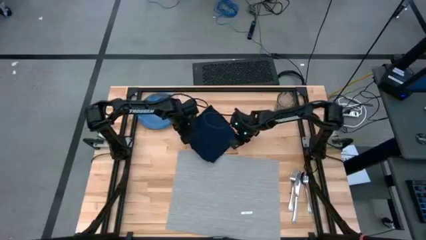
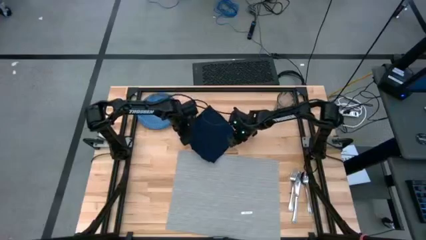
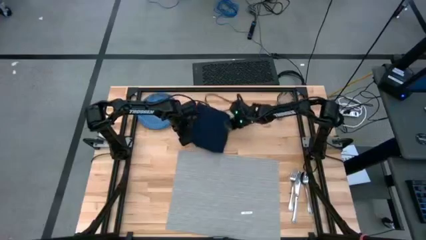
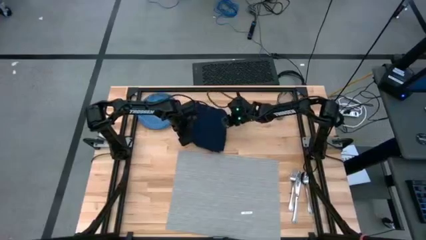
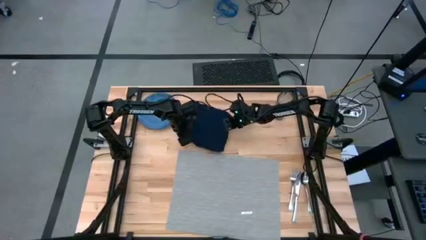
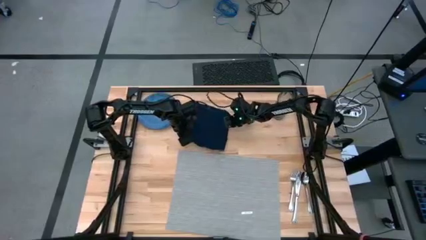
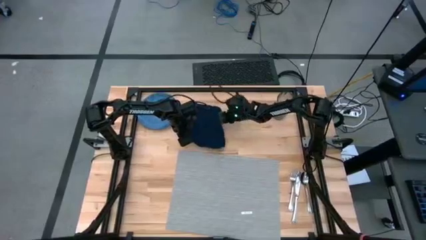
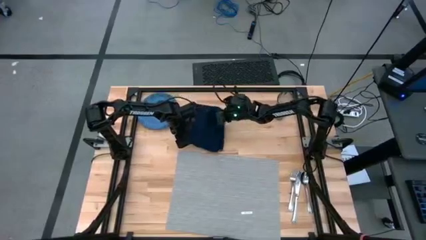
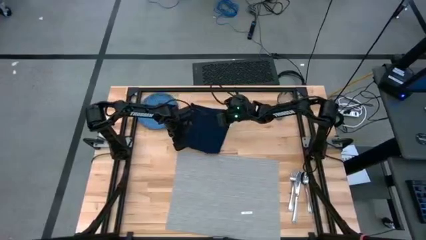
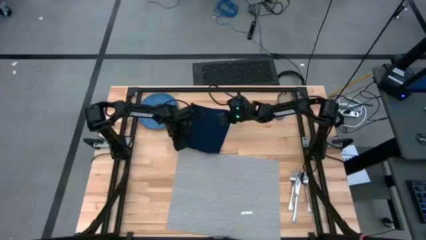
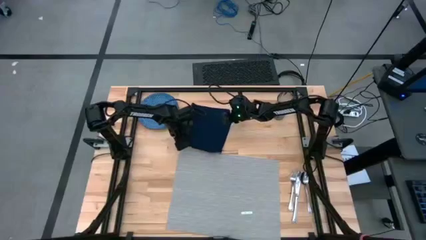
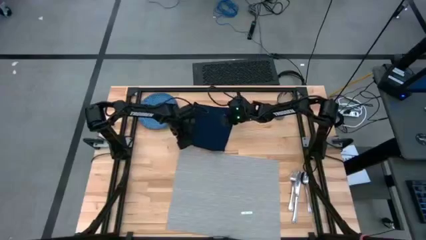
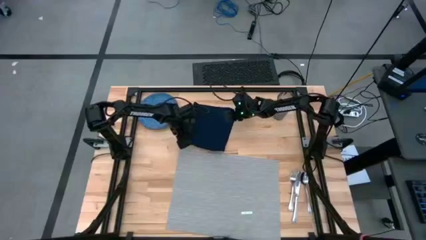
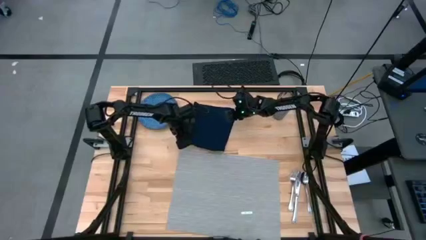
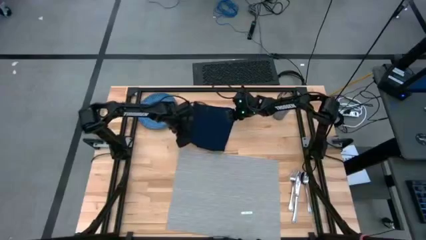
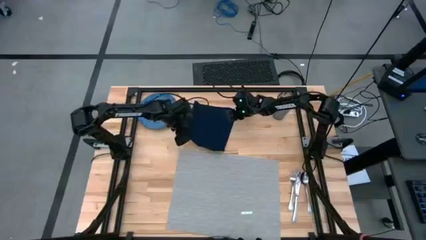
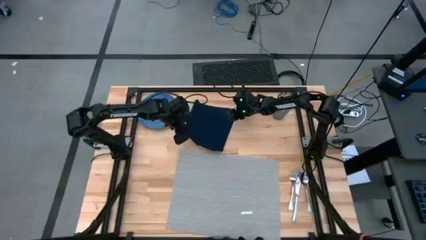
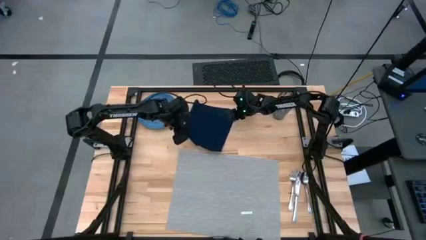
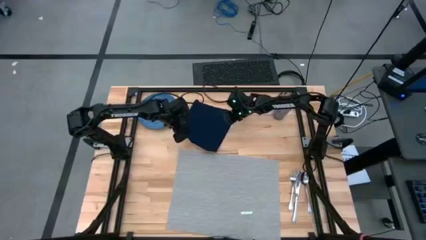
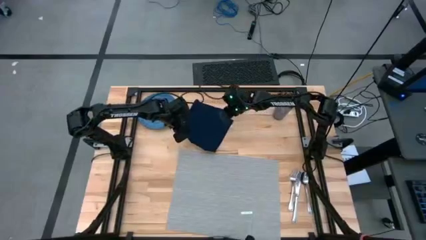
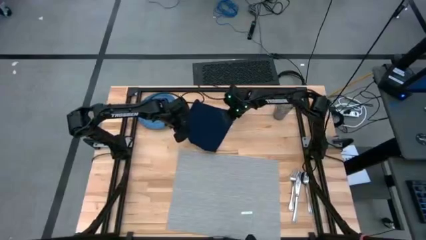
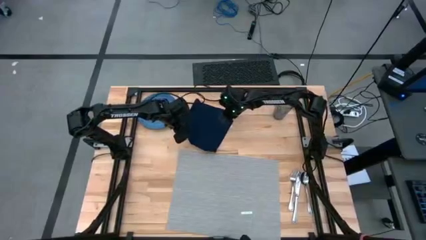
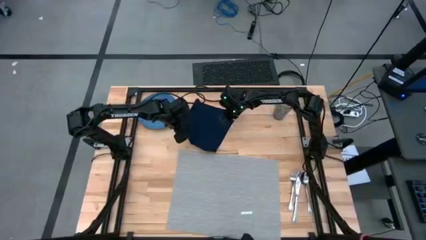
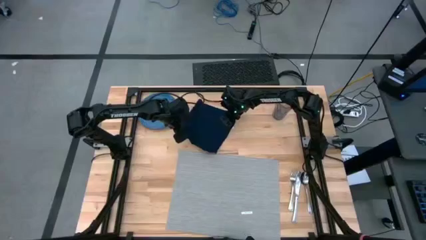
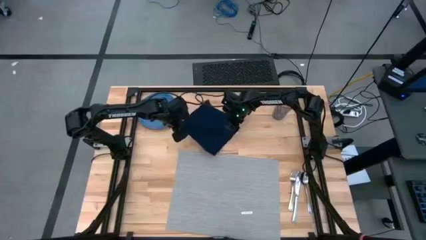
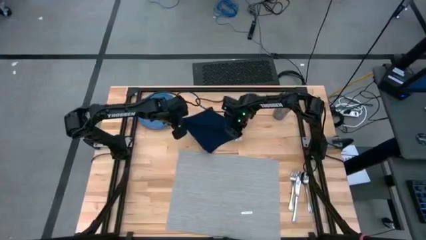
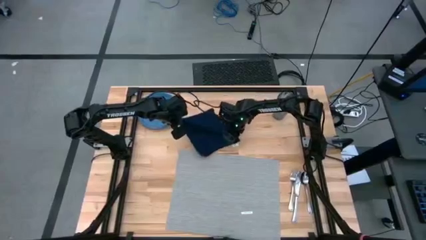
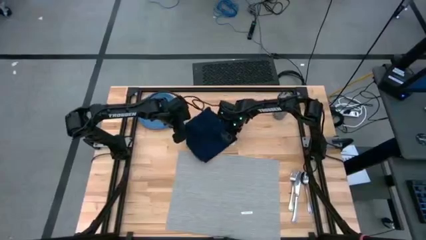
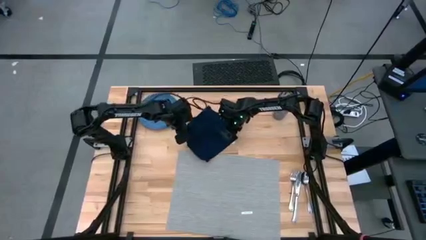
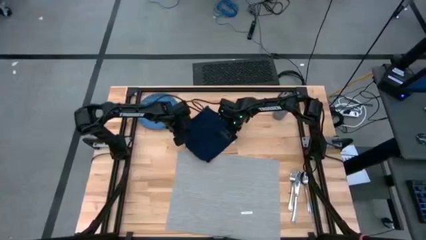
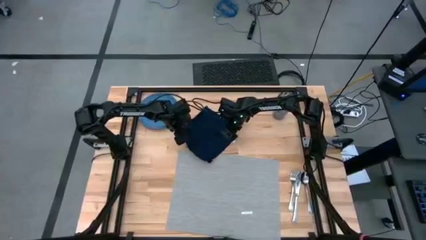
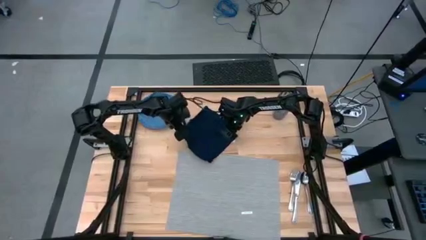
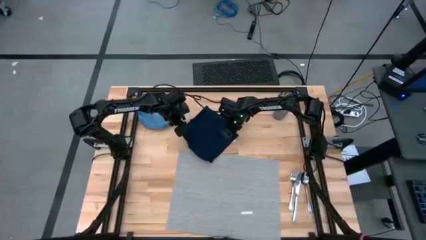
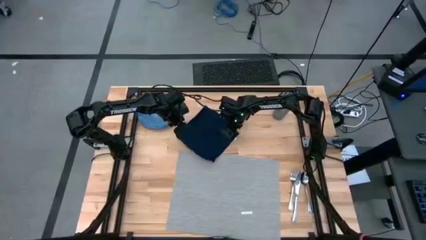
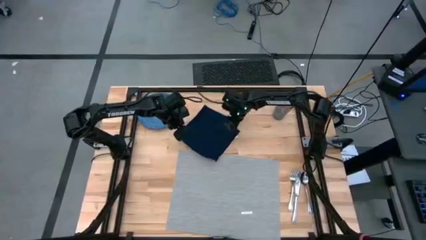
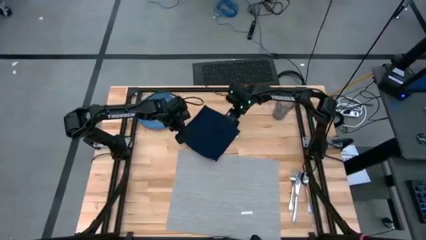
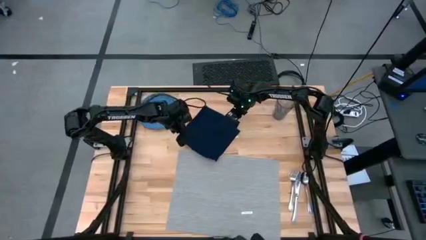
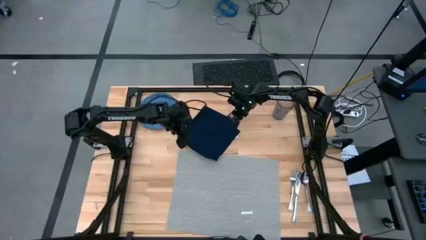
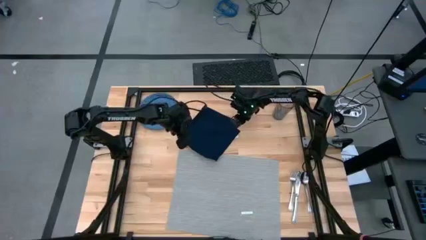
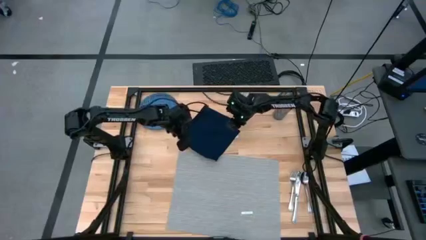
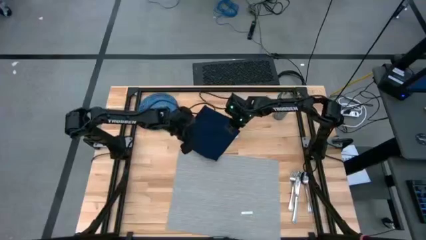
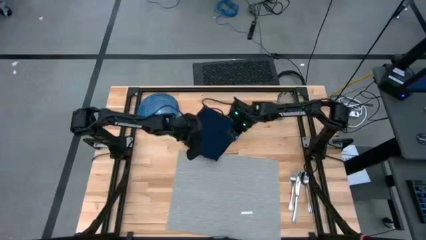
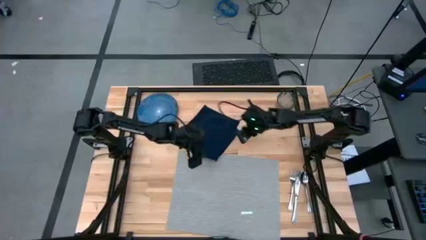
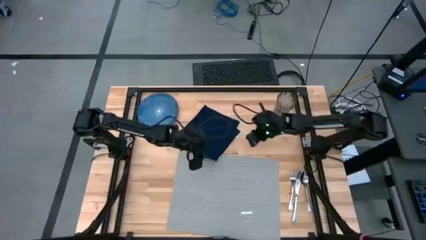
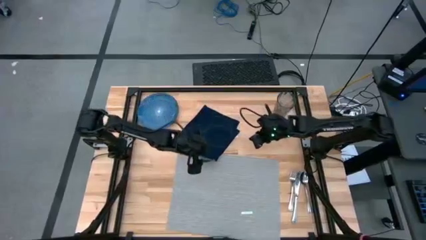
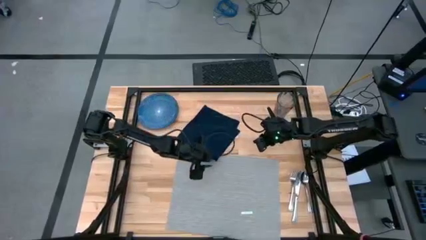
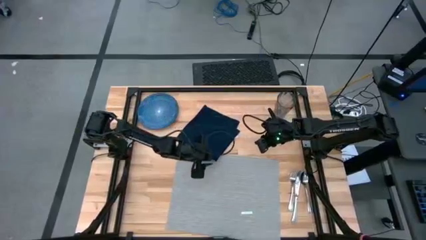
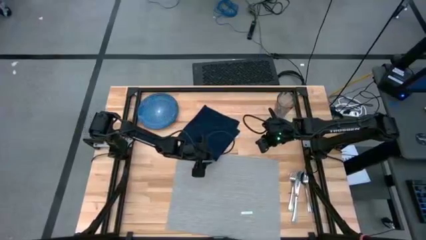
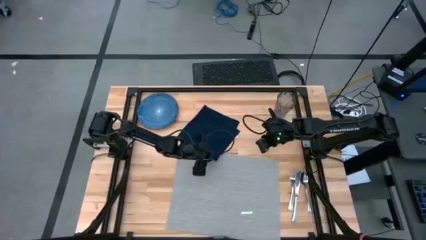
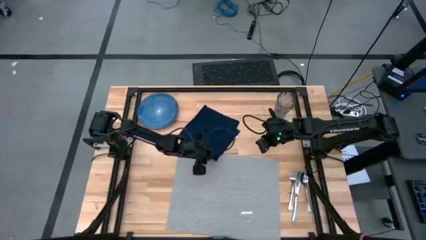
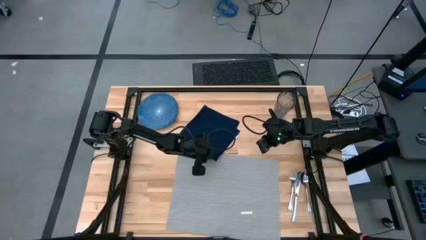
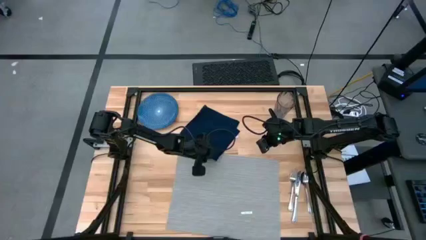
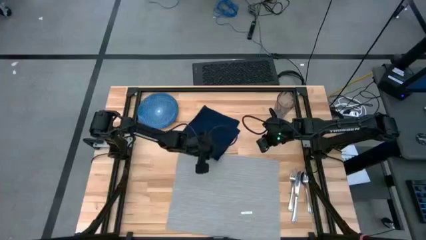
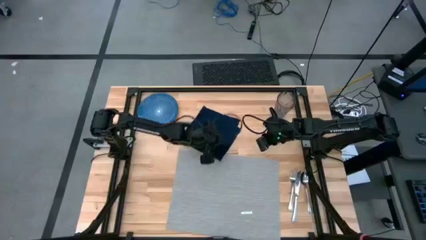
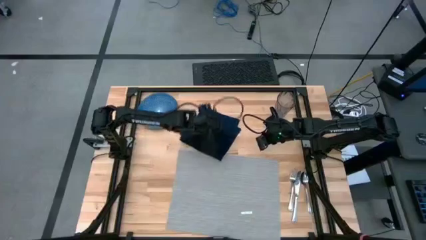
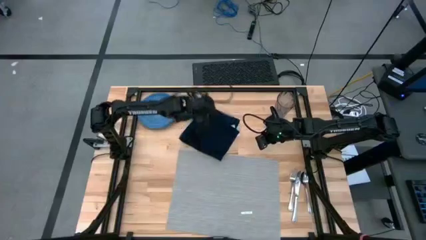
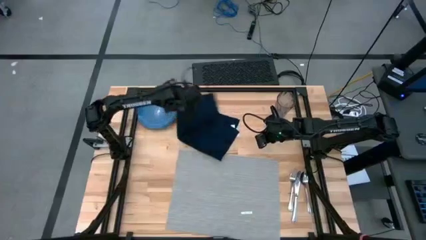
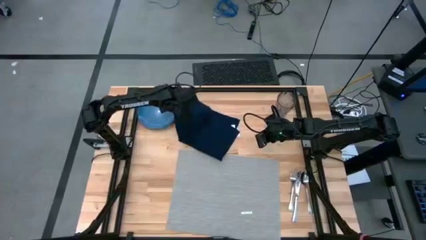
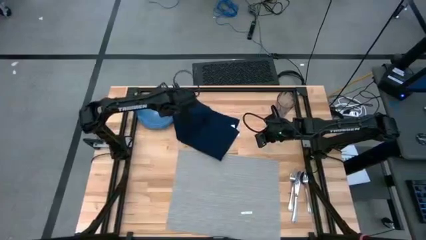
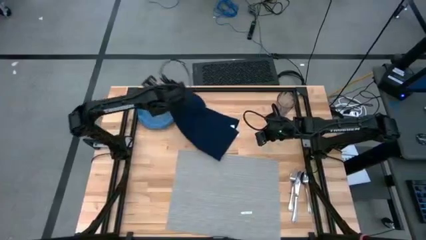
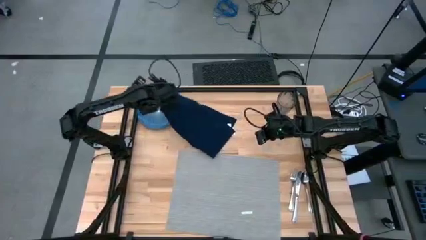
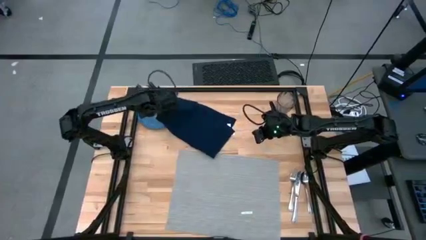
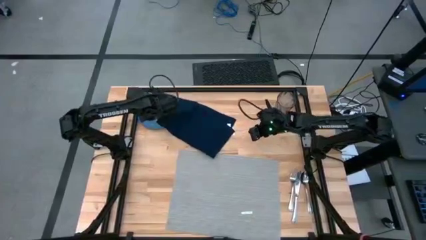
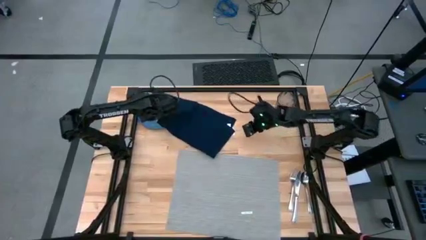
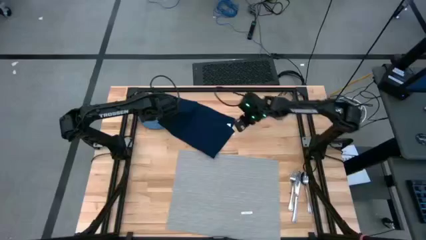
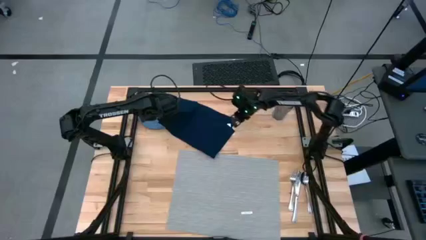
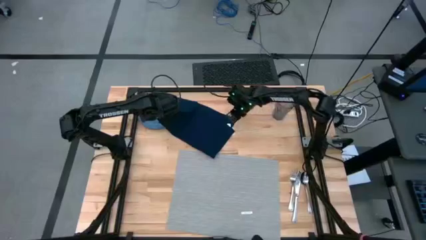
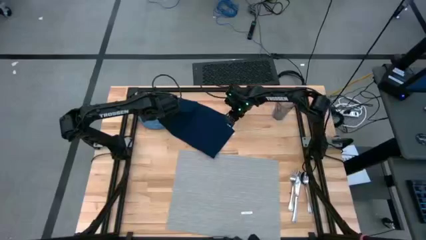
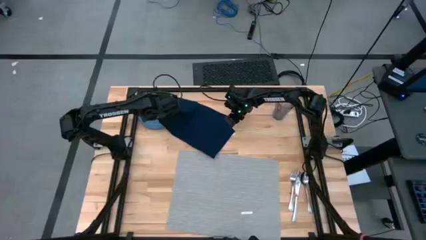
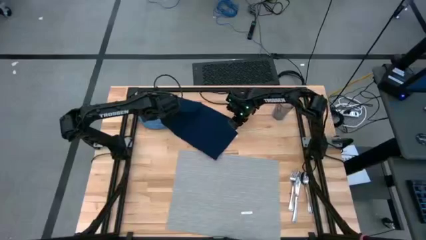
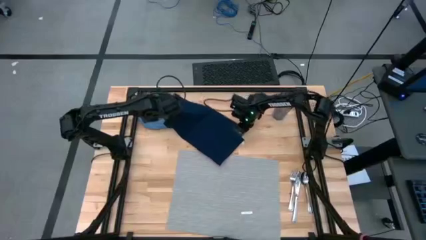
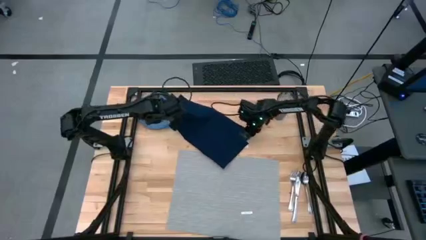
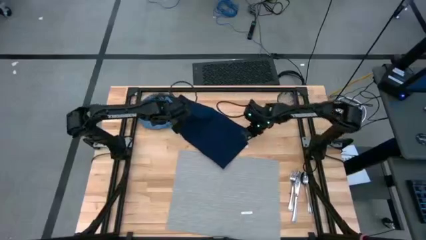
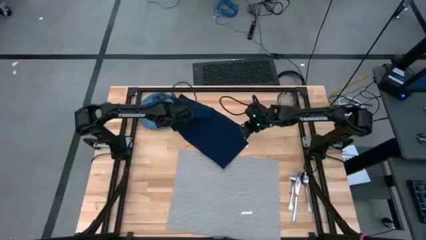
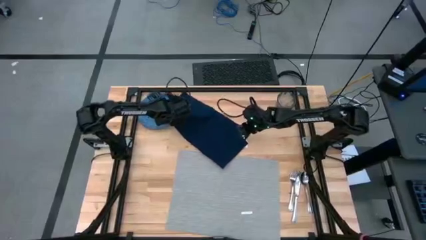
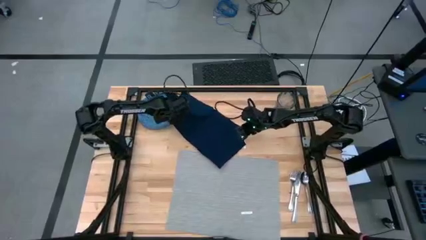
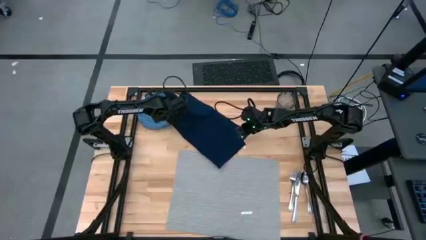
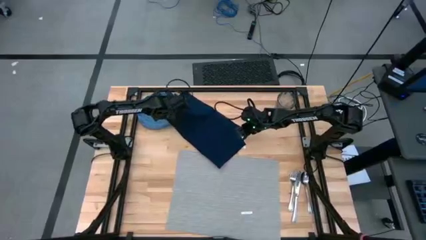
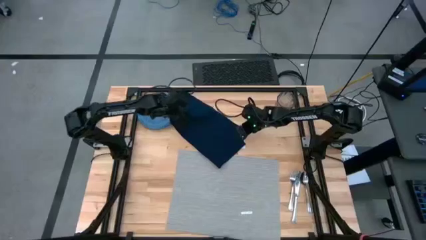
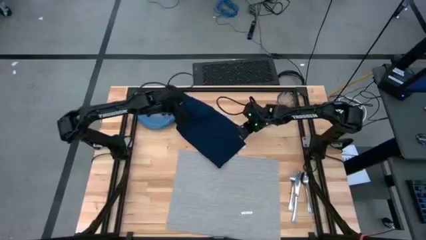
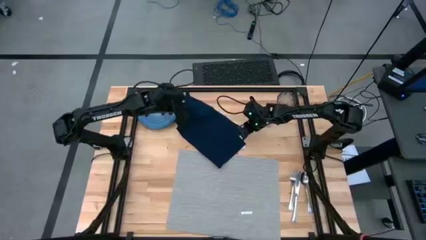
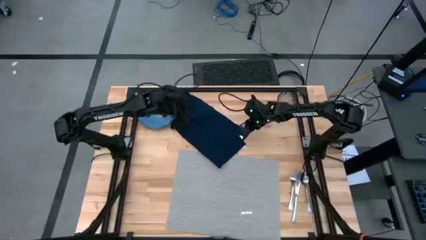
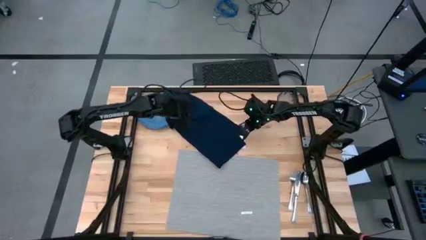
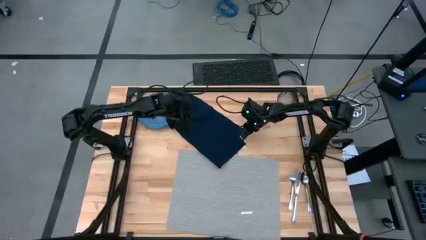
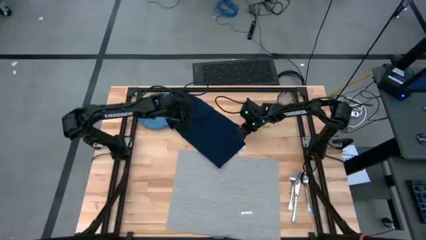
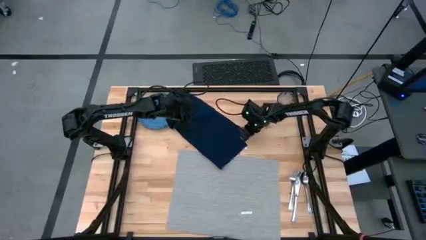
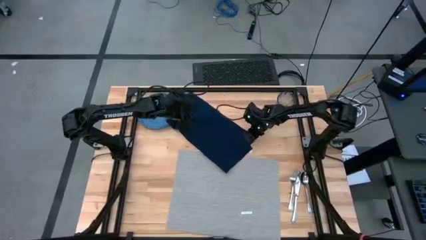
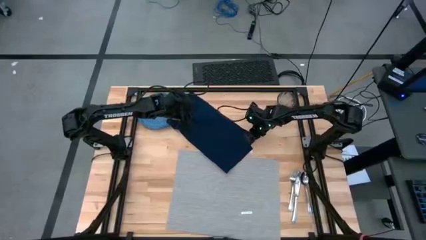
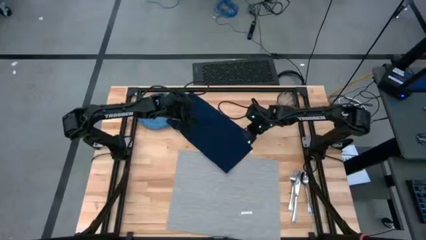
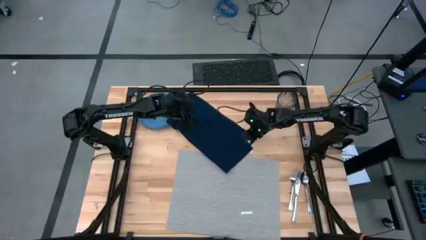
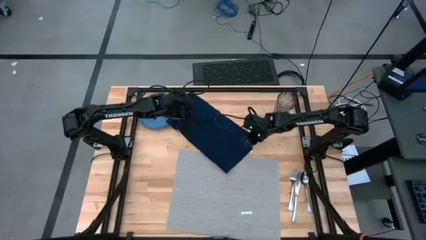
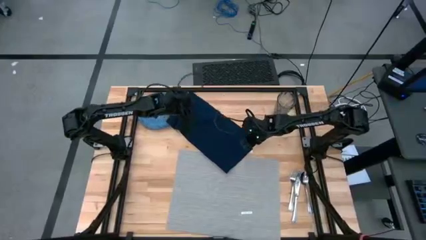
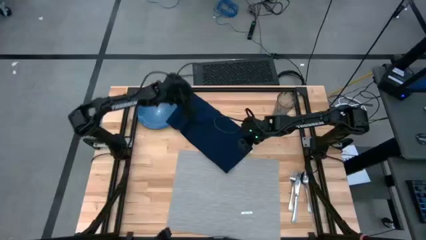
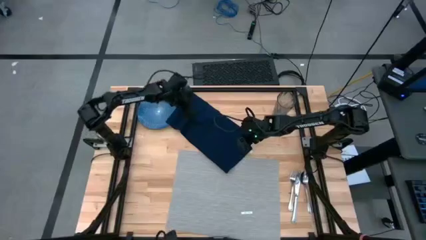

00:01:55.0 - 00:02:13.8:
Task: Set table place
Fold the dark blue napkin
